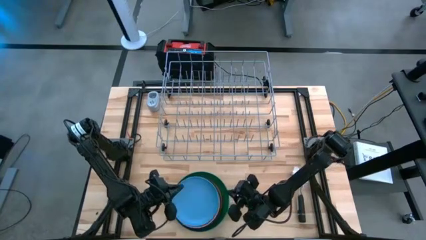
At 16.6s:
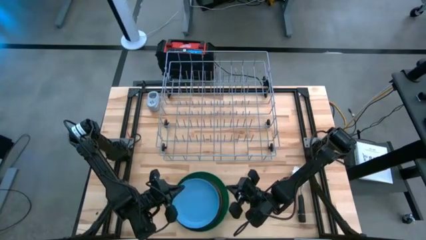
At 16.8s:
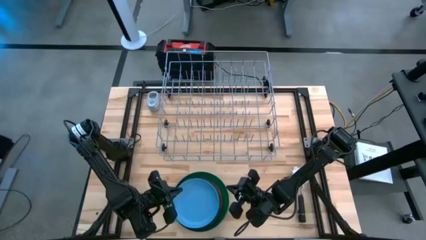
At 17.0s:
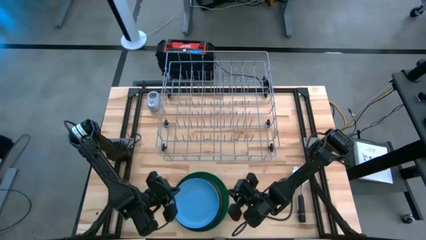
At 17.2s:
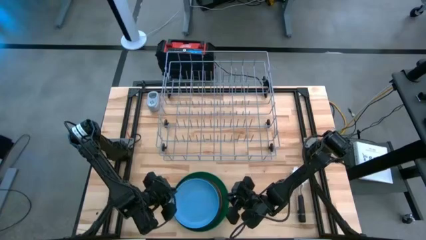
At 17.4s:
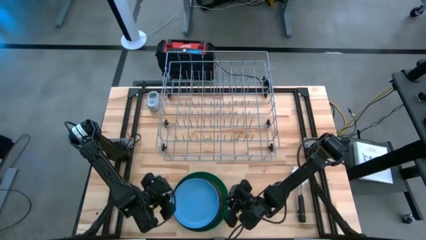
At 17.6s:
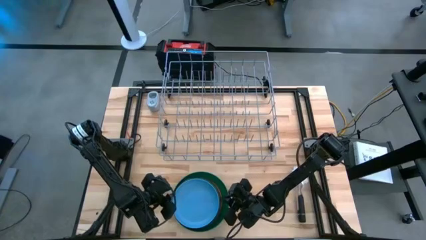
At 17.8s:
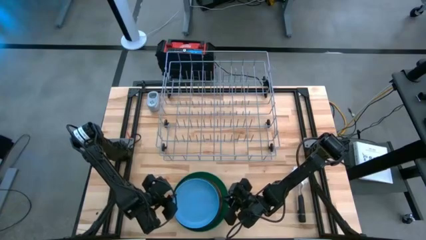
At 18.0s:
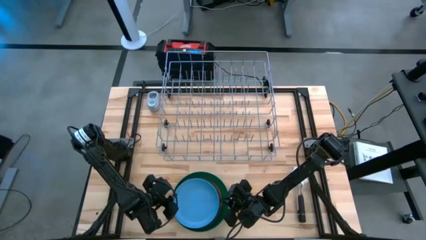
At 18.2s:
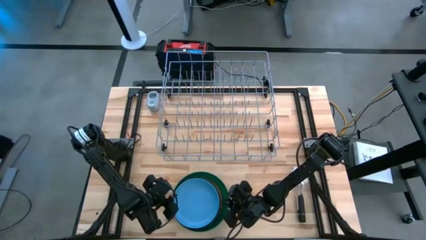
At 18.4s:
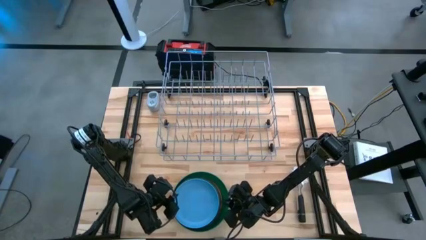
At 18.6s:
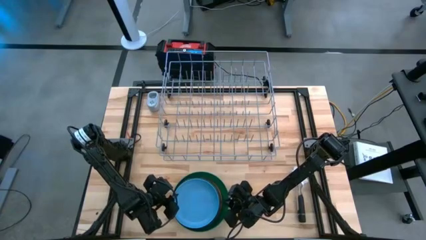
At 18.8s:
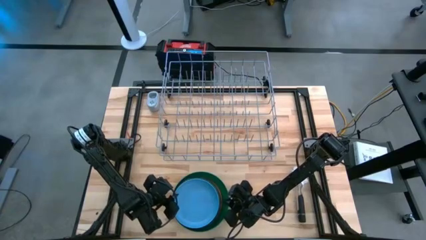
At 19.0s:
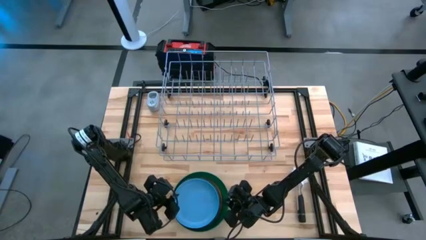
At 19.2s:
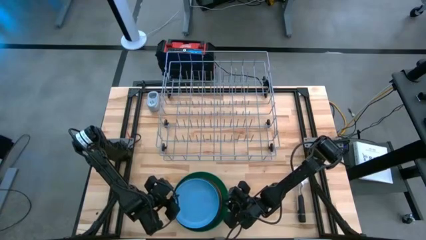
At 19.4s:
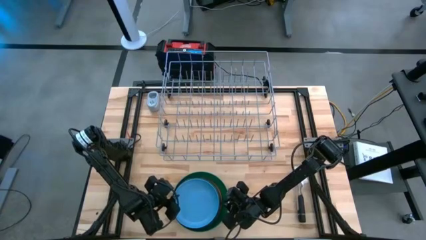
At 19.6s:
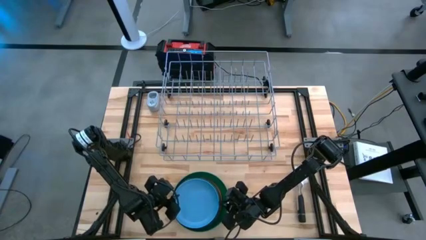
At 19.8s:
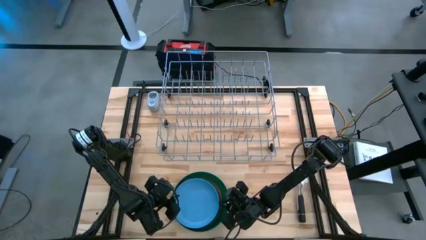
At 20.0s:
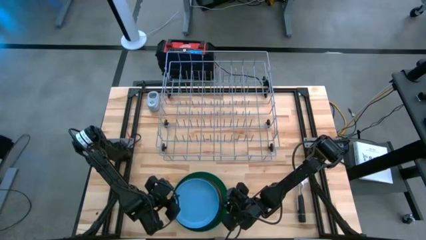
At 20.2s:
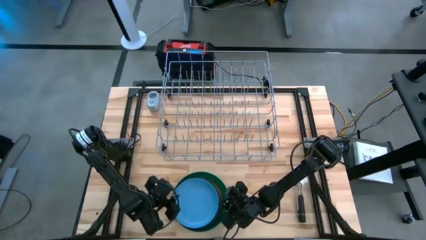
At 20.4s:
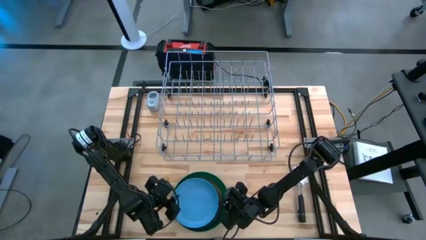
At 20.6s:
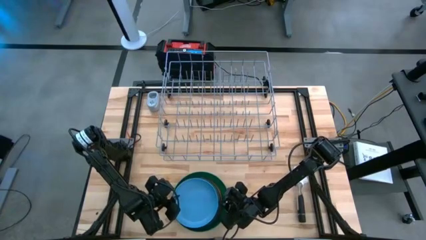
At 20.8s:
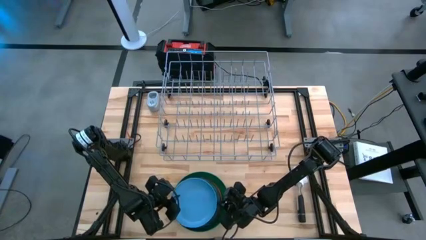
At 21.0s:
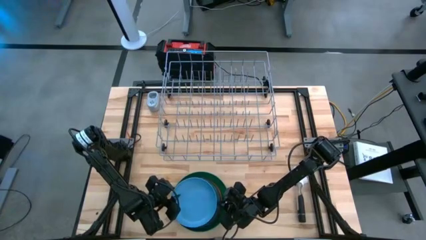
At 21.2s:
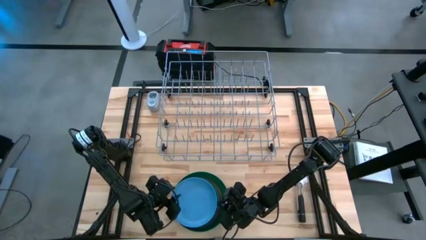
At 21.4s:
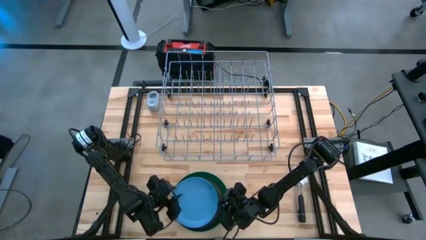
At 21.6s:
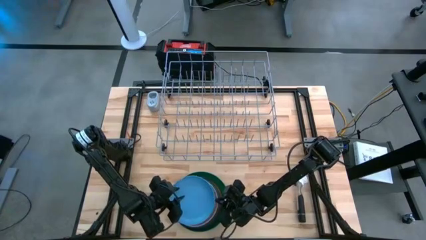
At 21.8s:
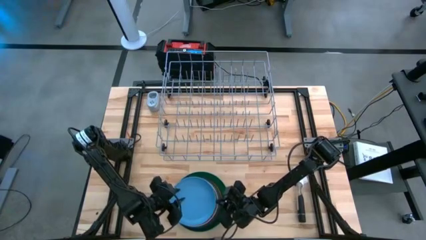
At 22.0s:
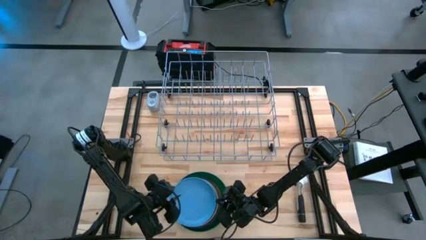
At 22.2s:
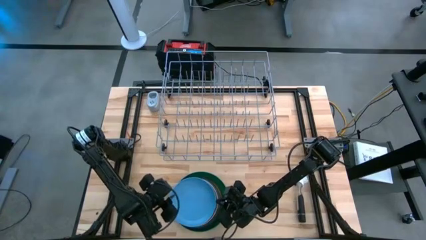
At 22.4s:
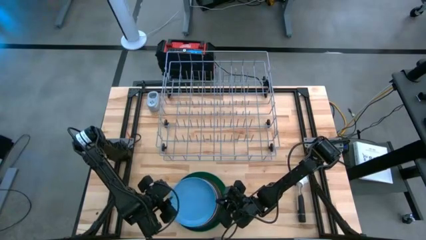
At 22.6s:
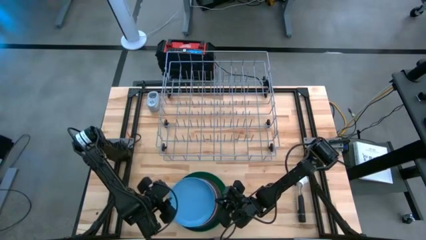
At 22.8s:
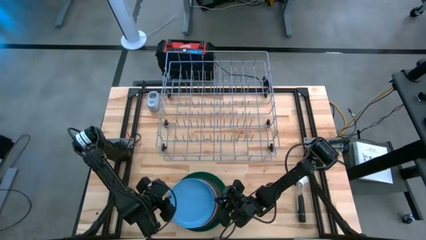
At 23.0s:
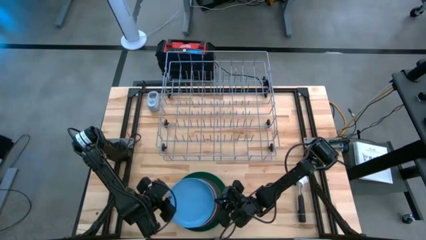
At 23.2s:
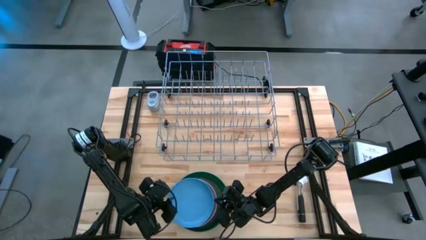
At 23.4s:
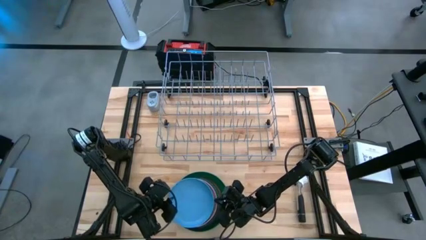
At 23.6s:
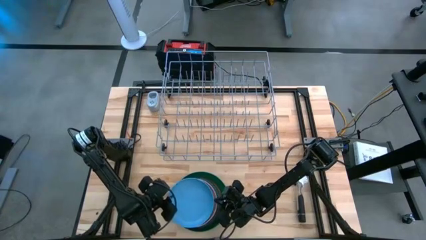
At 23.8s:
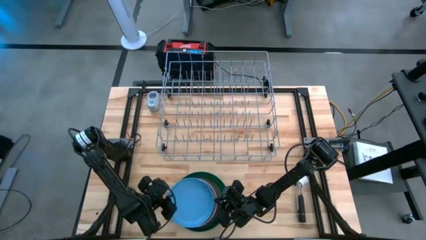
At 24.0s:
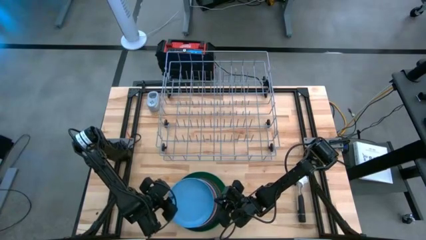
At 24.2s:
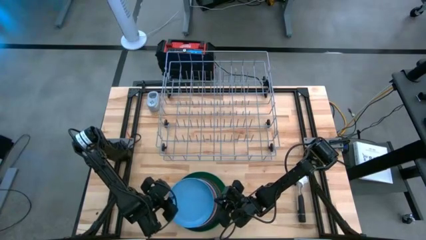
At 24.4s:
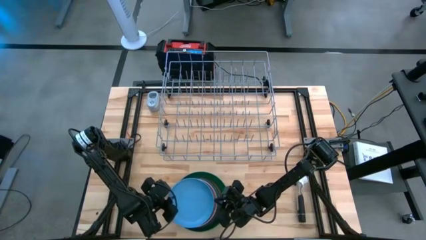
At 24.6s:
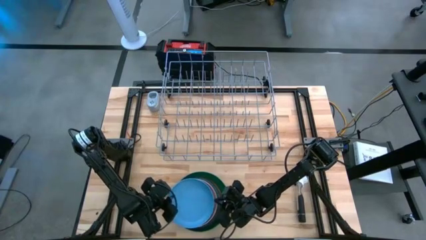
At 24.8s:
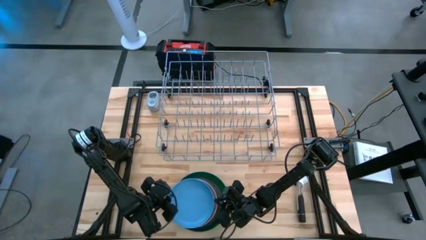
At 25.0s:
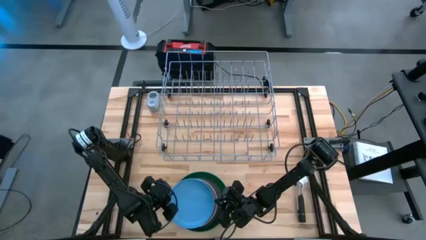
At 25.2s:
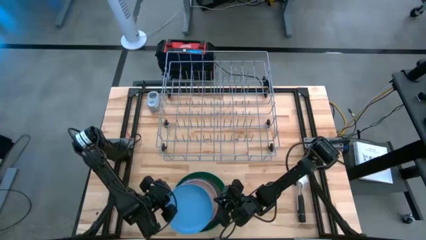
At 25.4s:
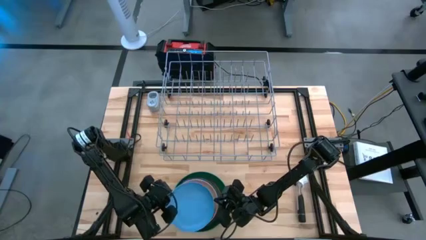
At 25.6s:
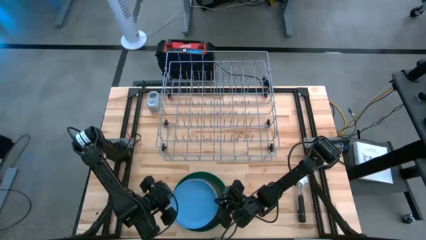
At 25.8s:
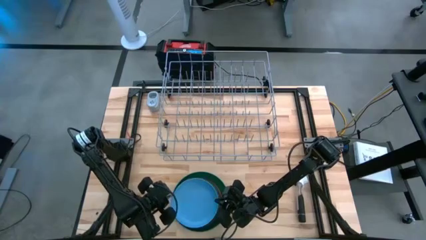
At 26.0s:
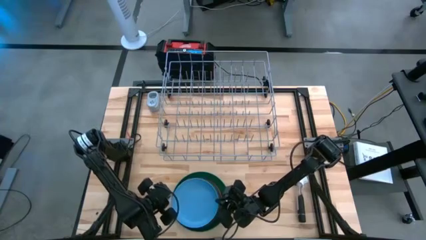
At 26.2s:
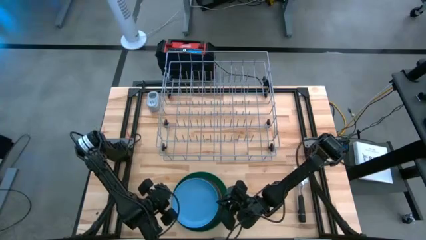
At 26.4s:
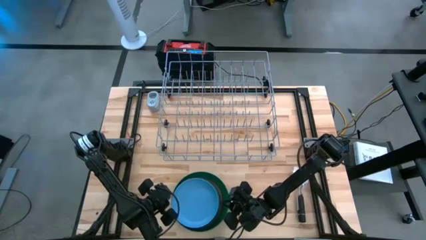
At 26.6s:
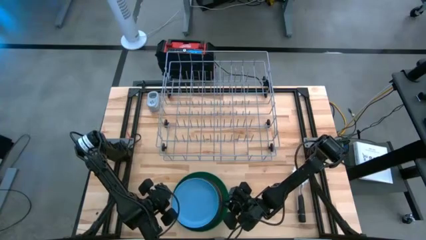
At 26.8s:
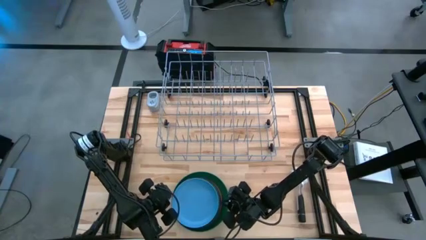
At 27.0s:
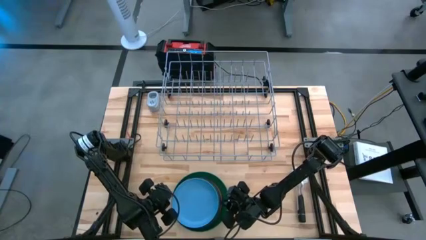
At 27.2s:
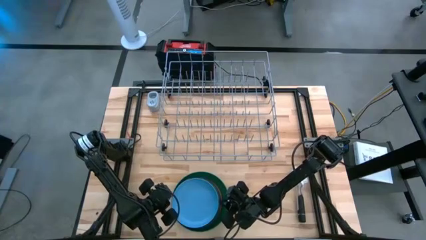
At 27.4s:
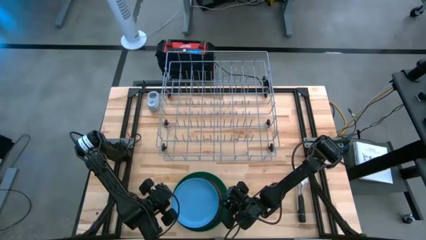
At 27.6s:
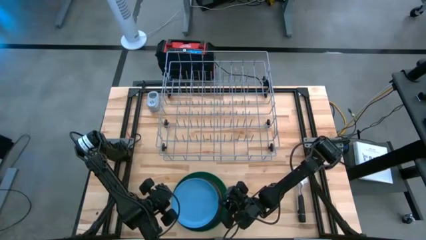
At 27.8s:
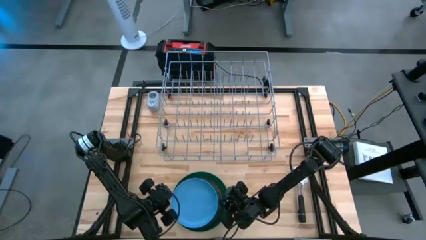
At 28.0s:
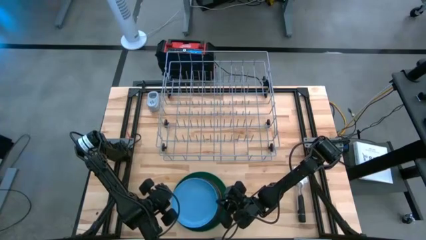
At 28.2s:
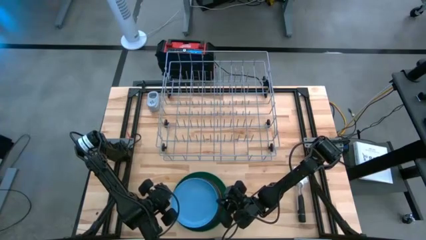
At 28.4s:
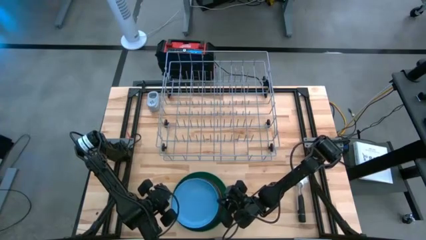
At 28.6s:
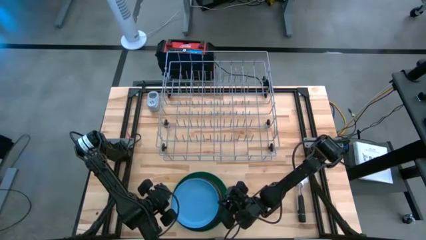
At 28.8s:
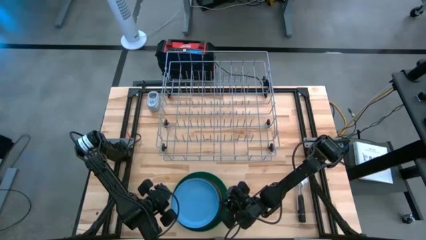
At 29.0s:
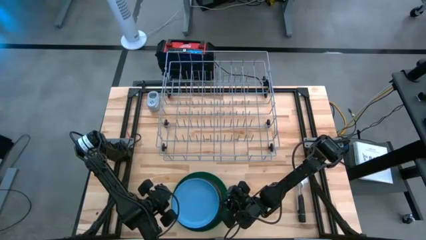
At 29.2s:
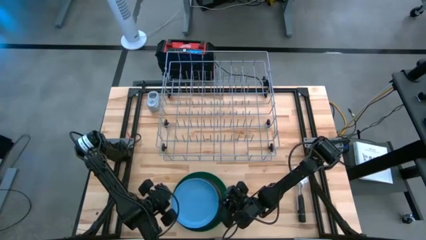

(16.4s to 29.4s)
Task: Sort dishes
Put the blue plate into the dish rack

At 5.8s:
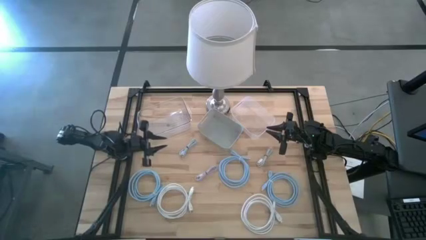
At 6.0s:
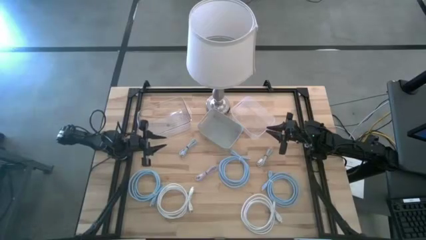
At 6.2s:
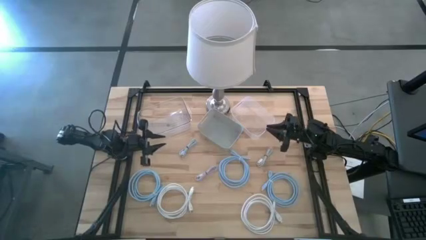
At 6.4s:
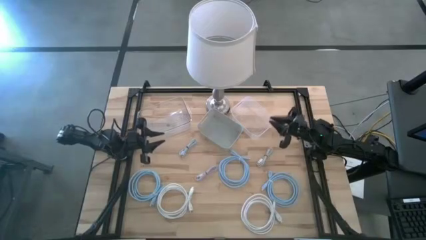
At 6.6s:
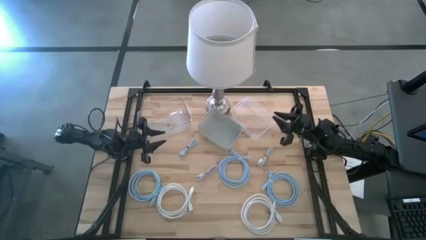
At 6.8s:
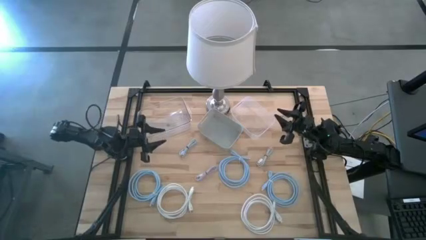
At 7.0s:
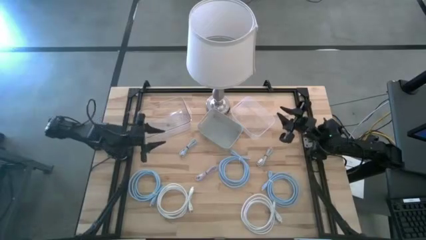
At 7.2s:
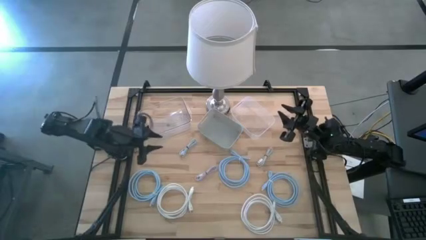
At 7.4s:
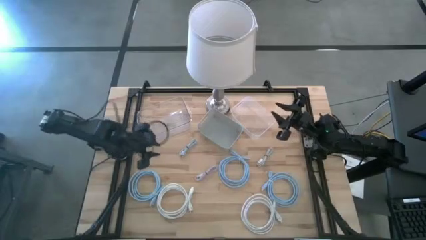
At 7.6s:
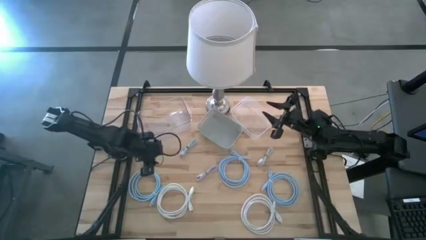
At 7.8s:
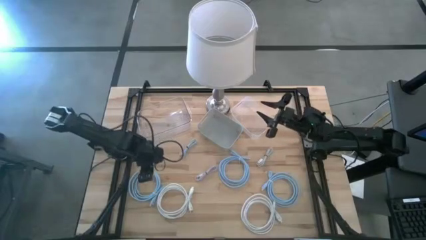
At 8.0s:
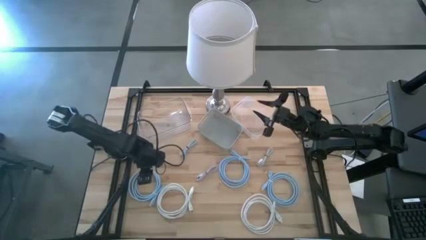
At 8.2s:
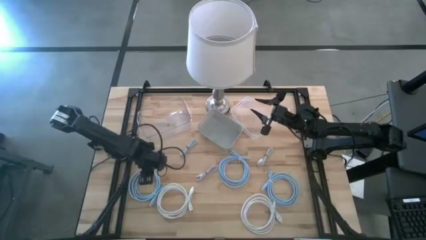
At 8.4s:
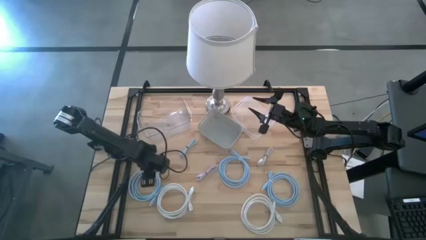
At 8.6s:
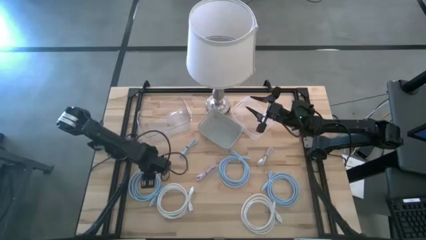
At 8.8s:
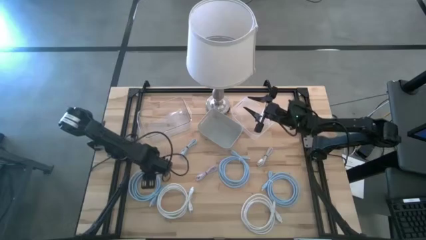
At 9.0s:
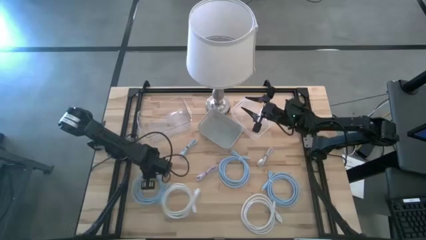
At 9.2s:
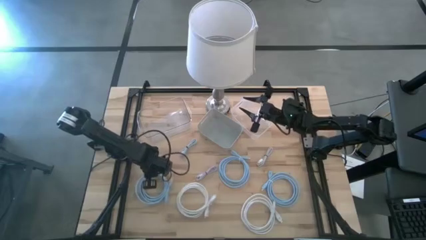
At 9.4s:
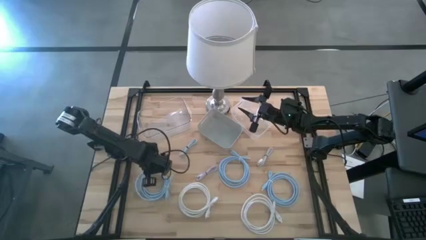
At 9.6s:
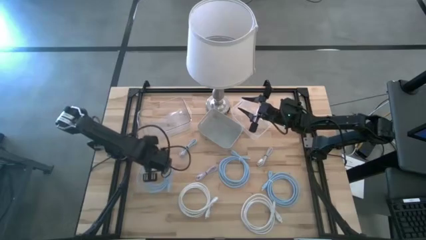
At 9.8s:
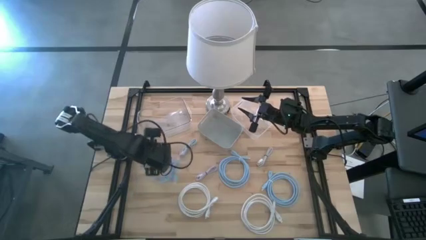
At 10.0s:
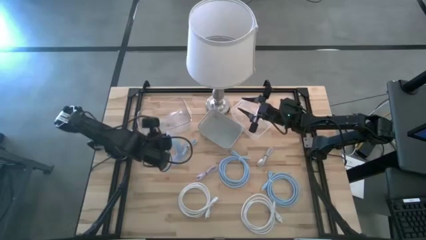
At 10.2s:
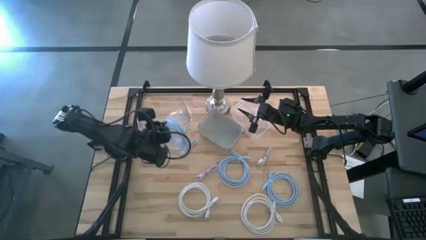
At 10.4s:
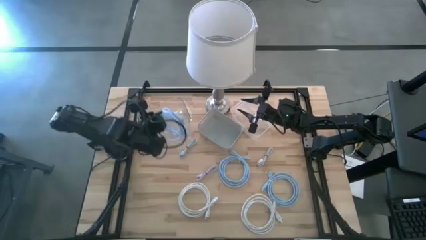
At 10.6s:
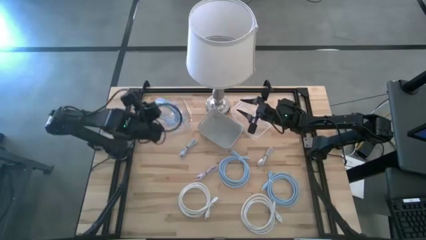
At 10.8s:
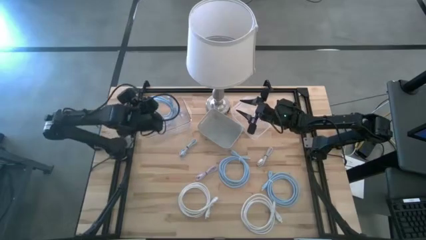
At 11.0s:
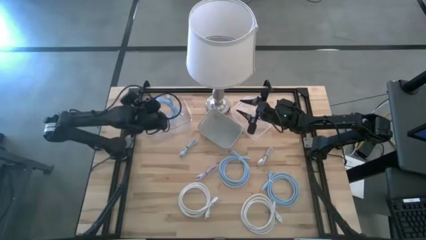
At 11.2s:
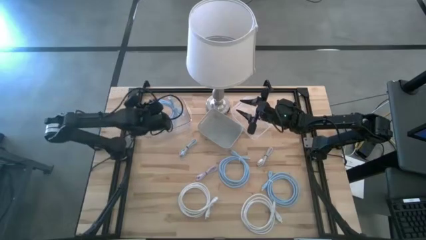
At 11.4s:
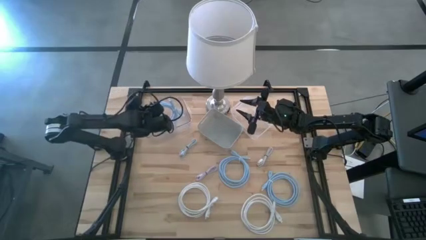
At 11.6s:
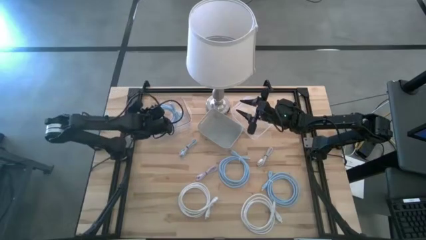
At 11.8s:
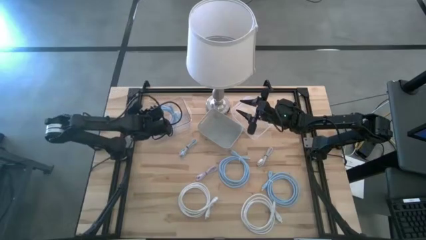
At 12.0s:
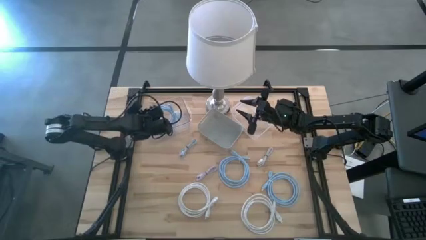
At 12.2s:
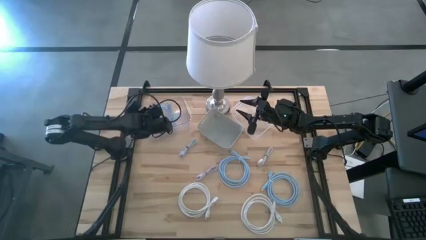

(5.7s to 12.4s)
Task: Pick & Place USB Port
Put the left blue HDMI cable into the left transparent bin
